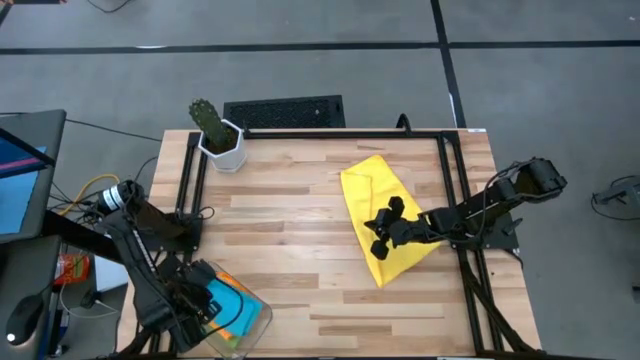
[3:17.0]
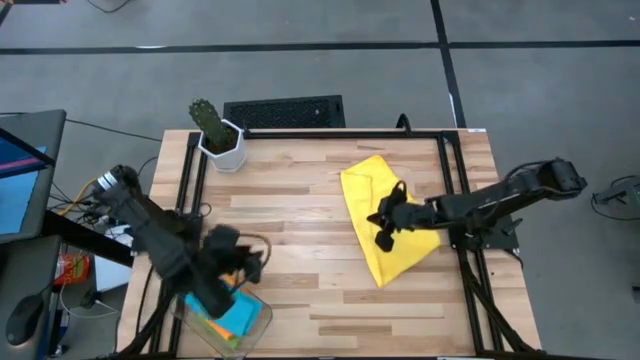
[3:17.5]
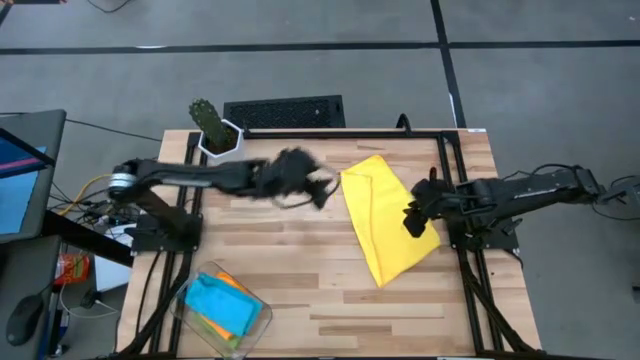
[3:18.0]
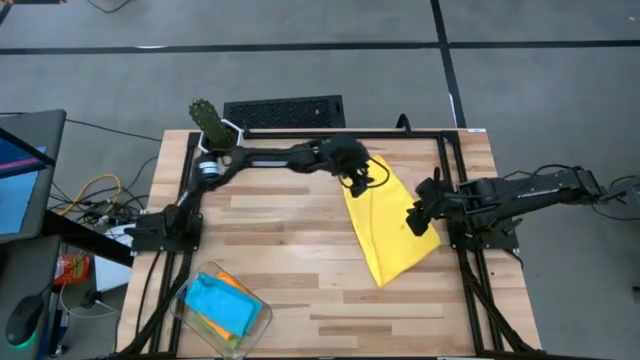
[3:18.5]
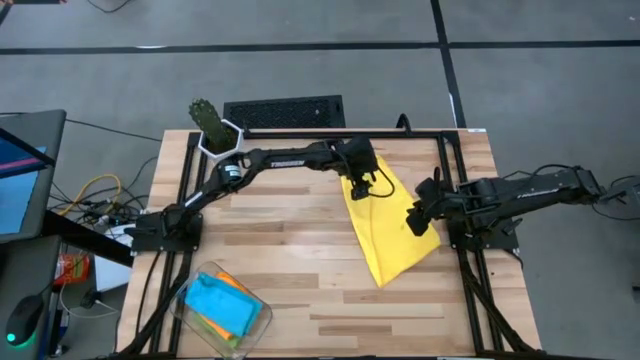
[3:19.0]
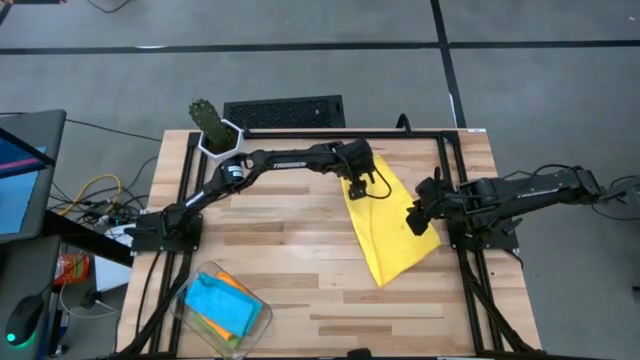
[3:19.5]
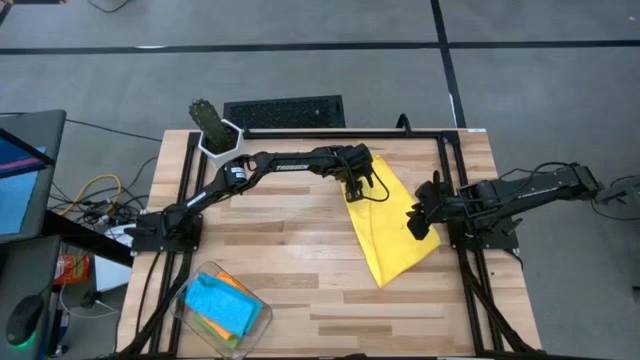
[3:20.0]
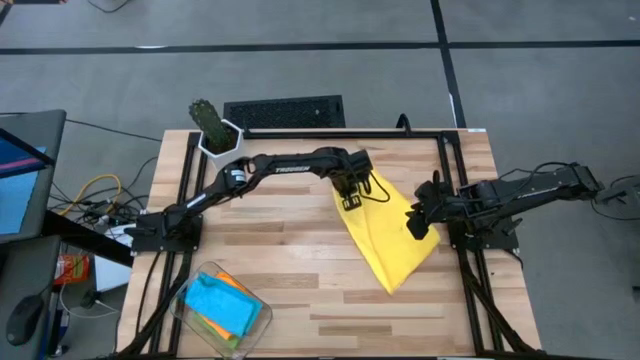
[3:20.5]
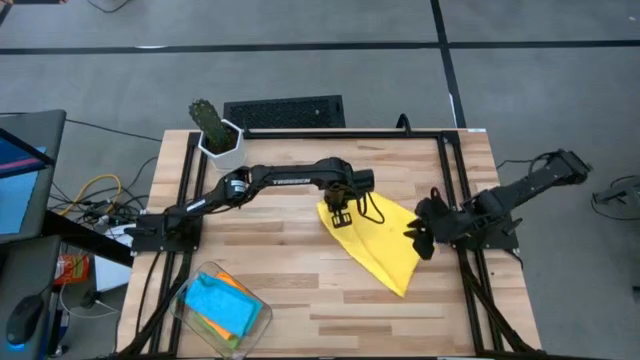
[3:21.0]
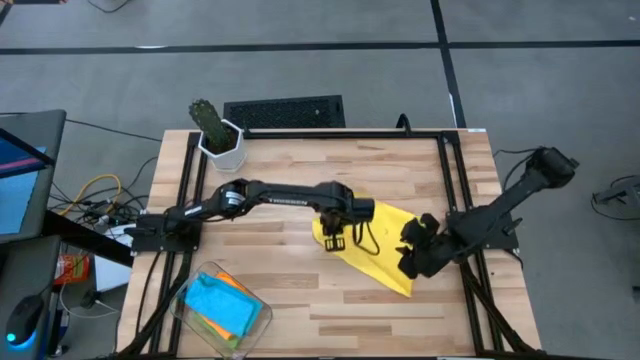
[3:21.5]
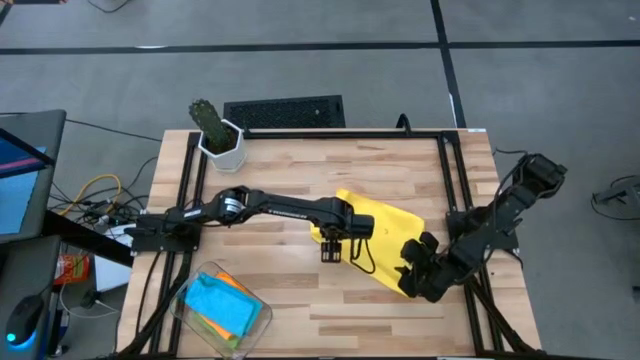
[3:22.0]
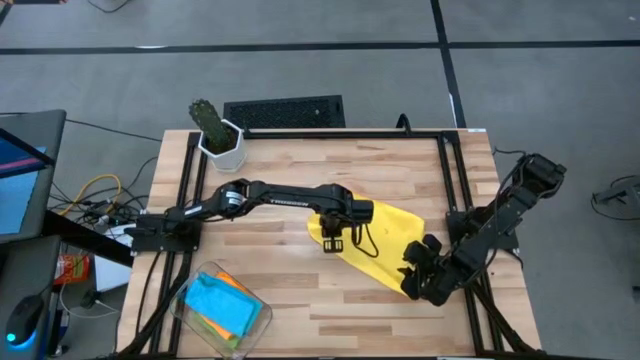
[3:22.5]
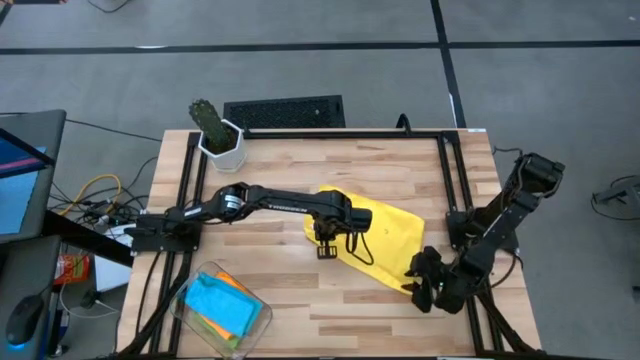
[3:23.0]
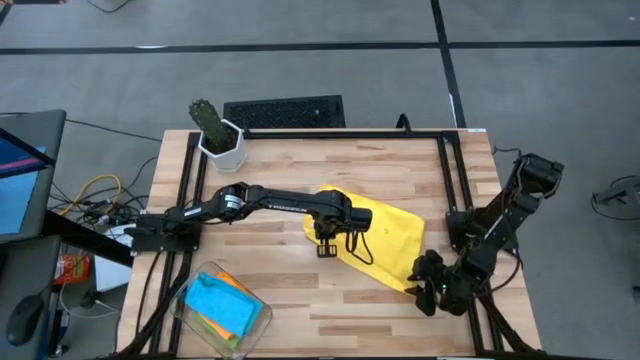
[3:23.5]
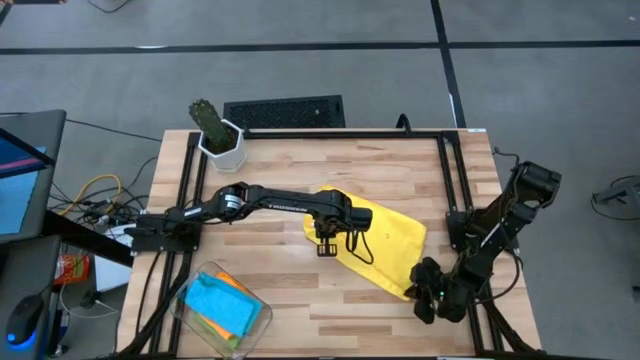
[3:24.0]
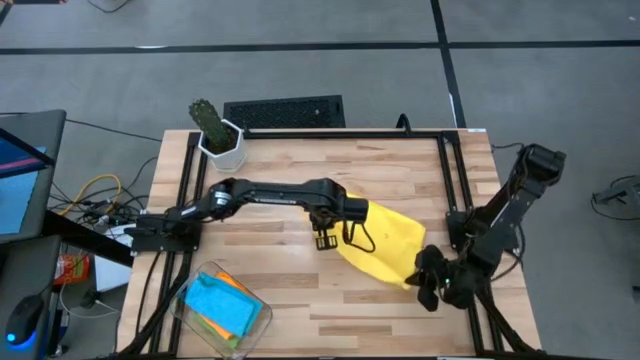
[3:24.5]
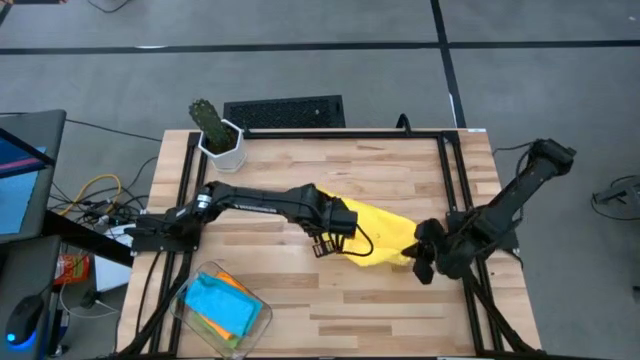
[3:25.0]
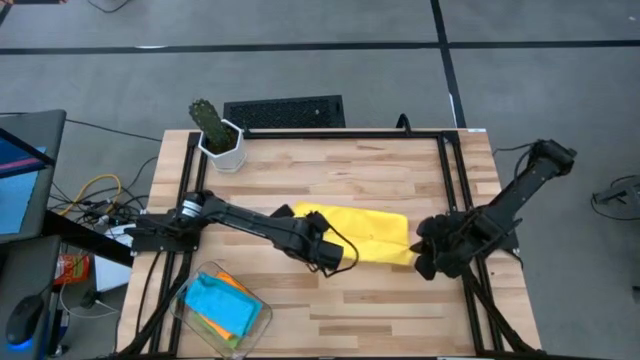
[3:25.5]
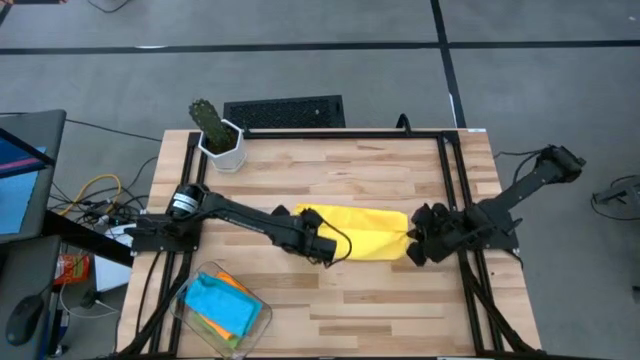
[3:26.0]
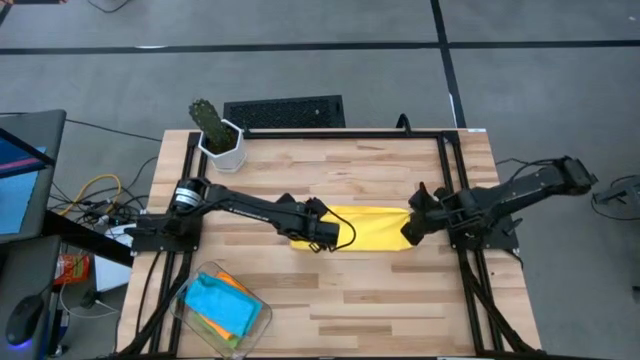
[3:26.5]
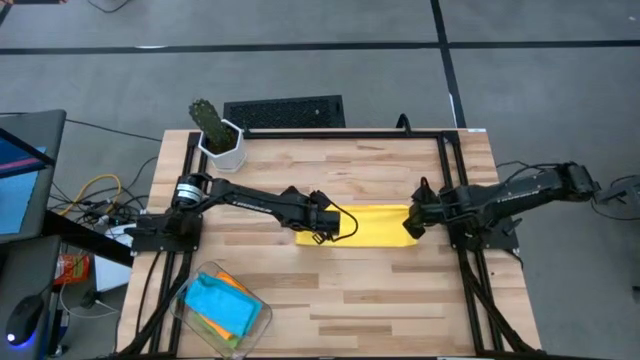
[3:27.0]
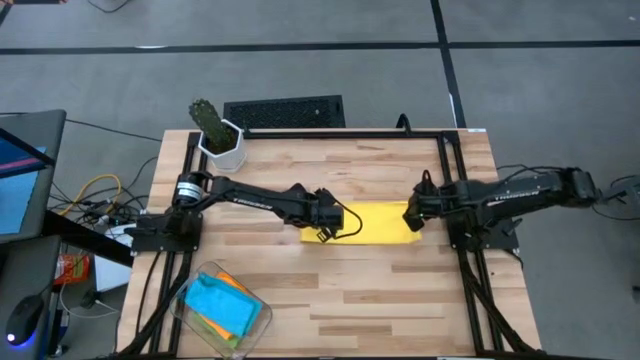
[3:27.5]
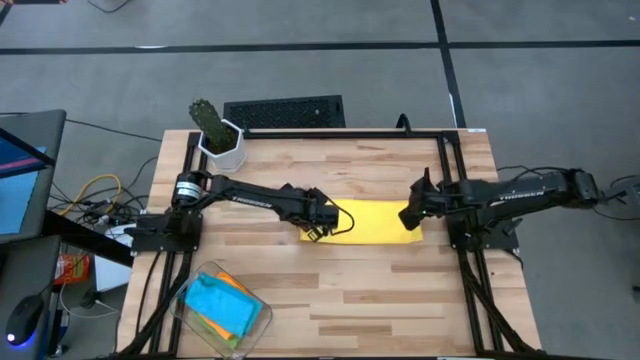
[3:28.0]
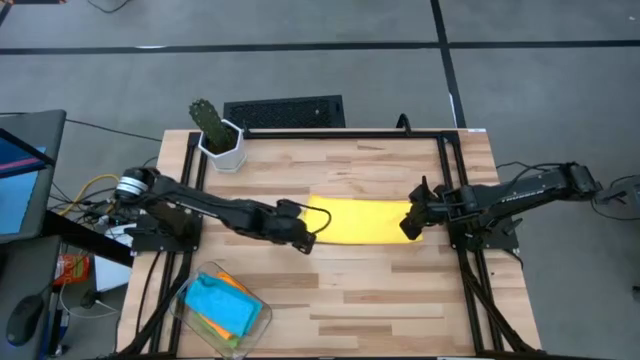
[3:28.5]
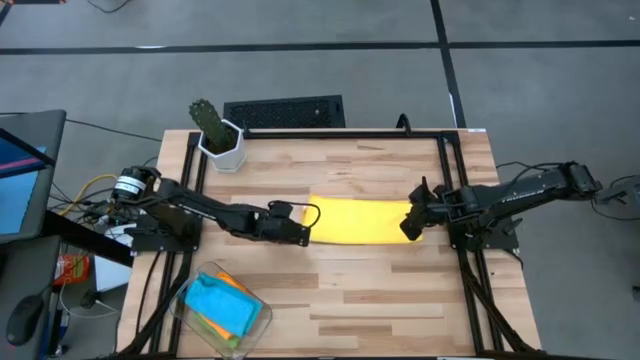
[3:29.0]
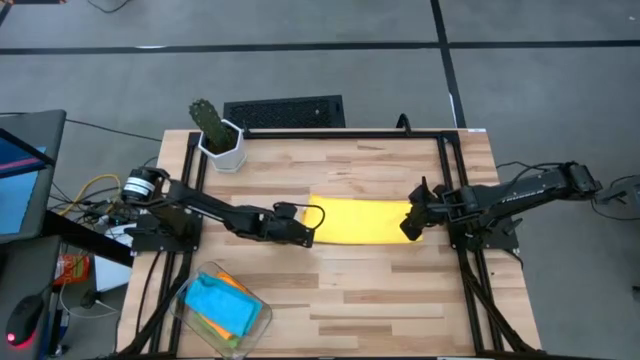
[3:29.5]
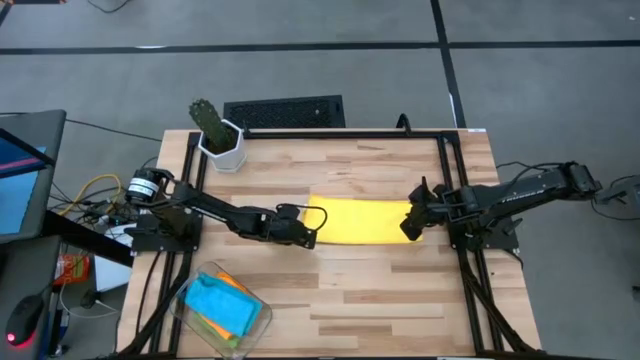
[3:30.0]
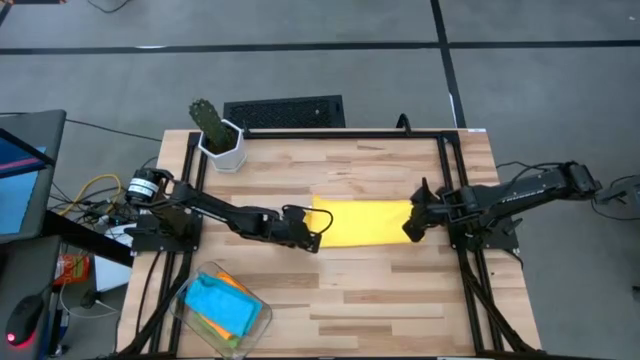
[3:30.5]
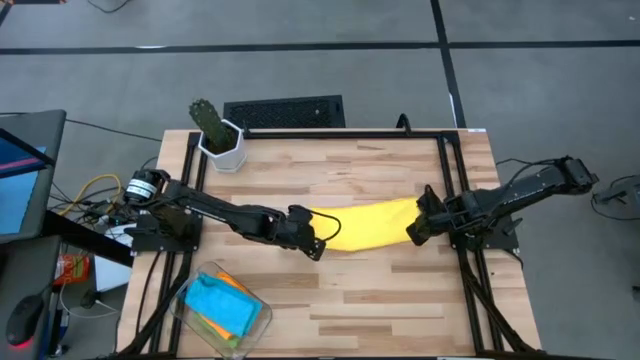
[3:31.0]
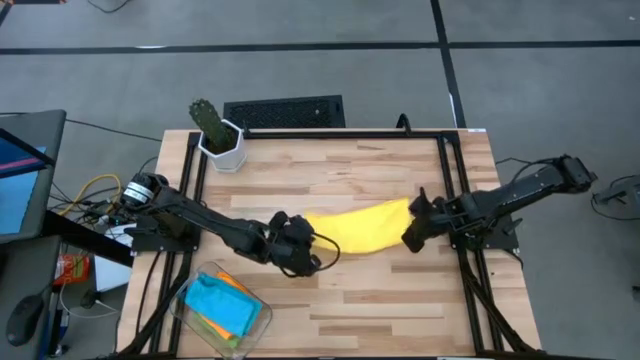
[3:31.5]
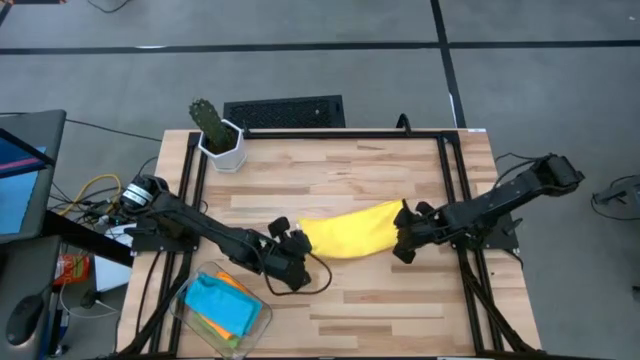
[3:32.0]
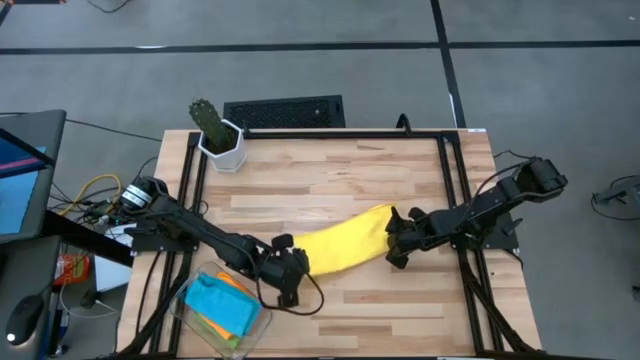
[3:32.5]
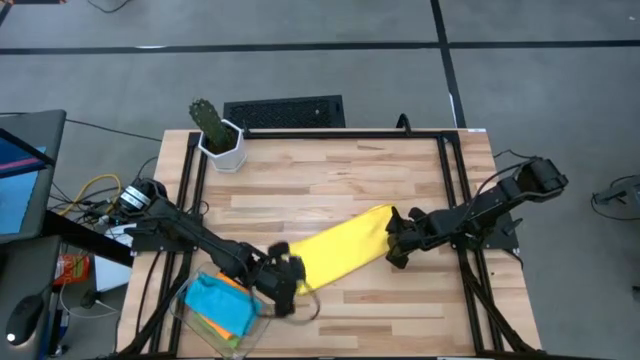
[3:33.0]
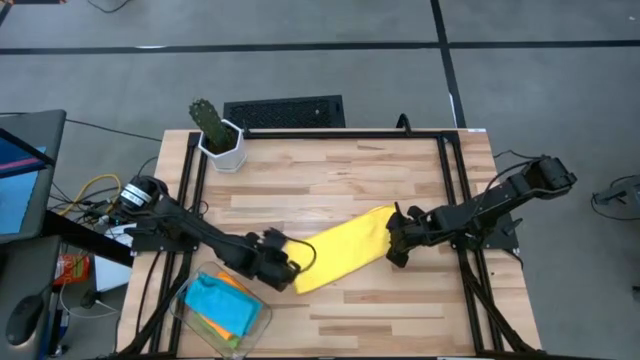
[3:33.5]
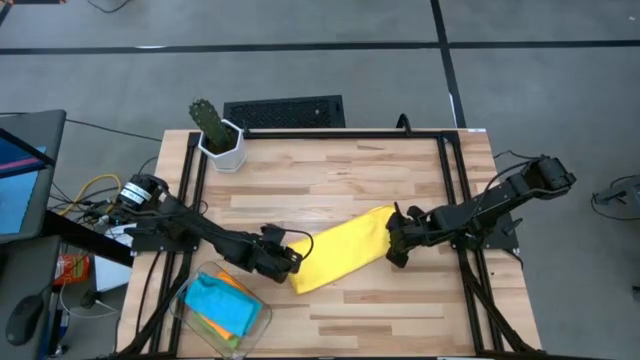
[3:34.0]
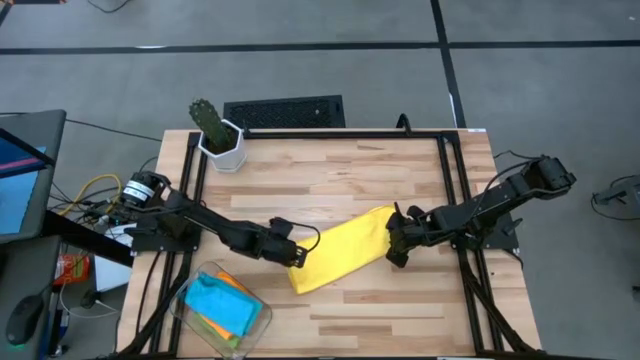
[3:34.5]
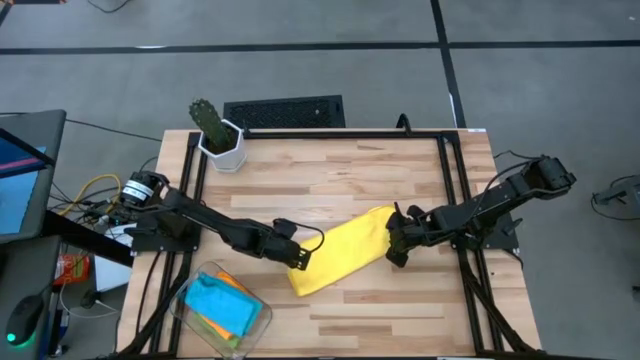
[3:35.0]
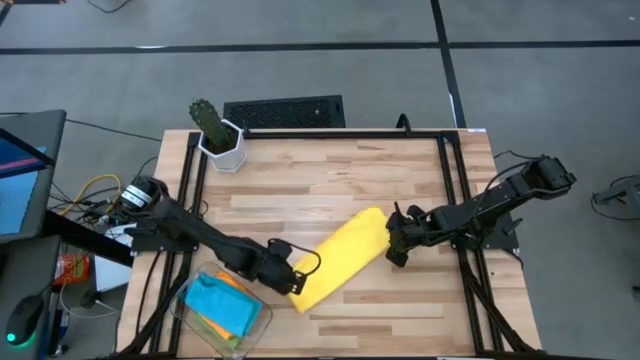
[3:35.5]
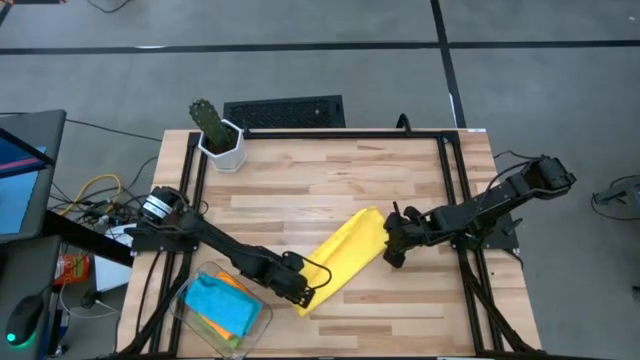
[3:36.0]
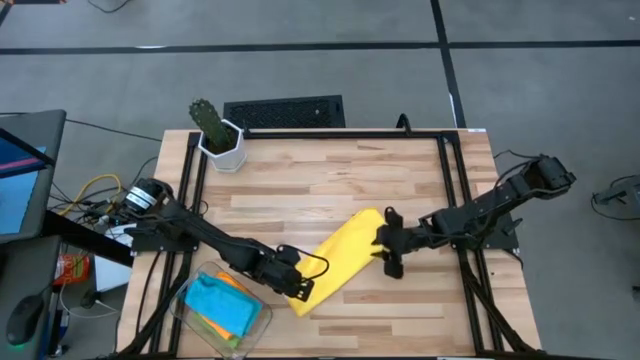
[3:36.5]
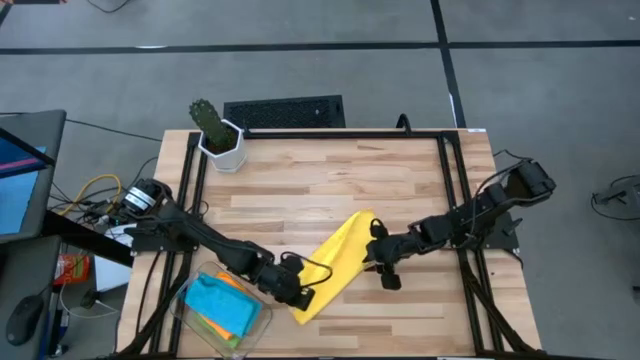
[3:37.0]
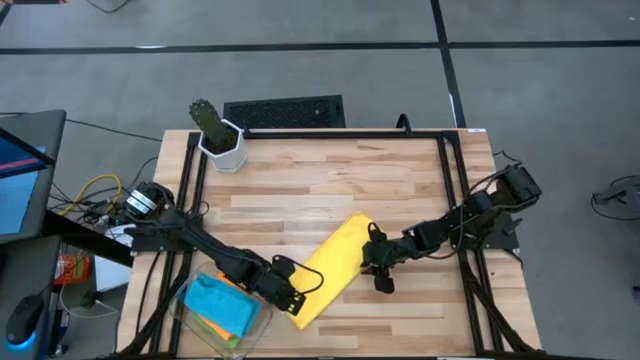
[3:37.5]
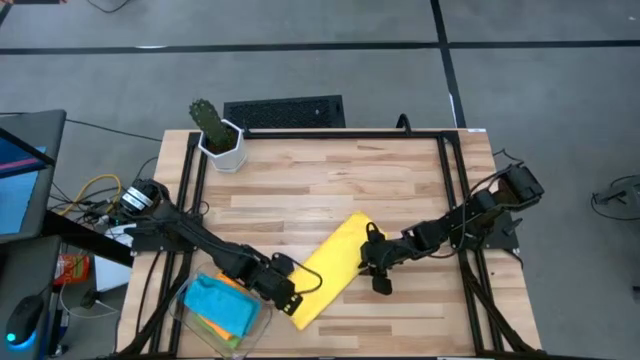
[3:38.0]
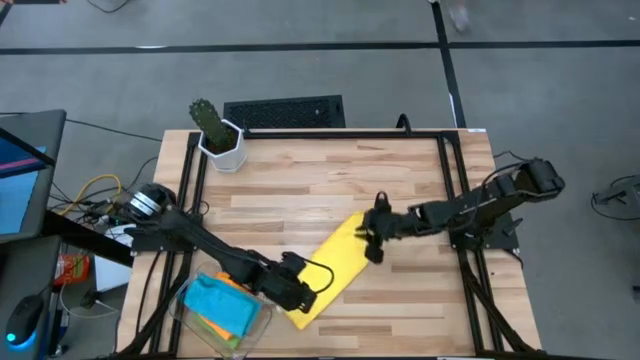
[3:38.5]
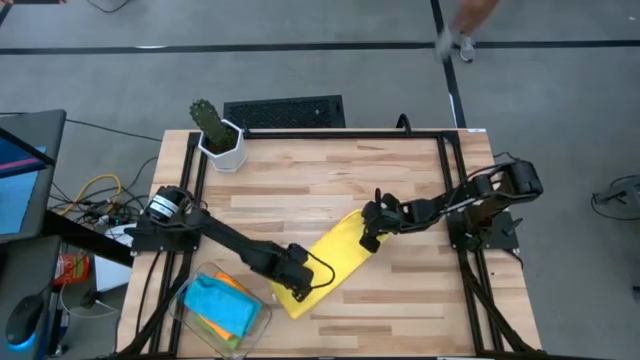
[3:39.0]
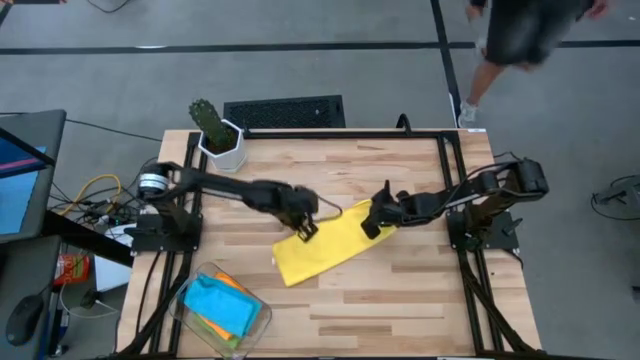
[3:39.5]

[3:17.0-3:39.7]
Task: Fold microfiber towels
Fold the yellow microfiber towel
